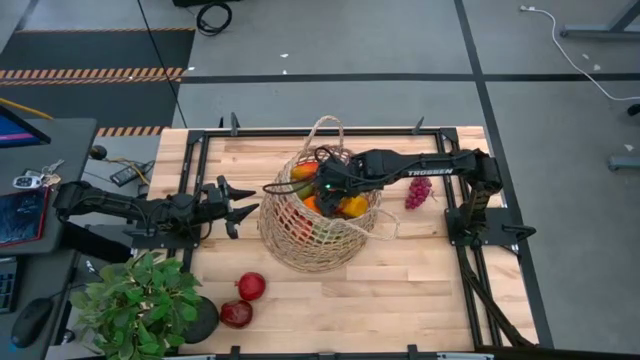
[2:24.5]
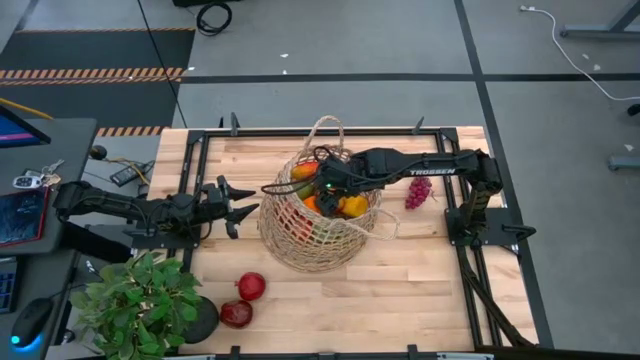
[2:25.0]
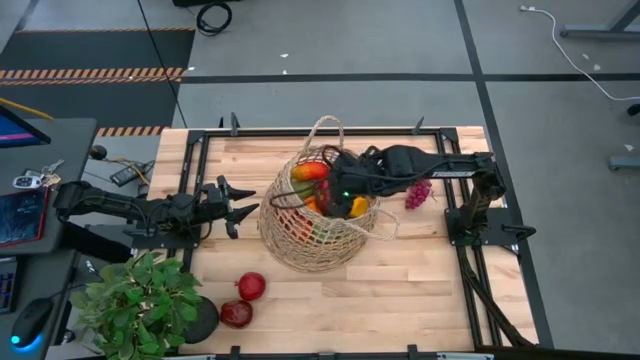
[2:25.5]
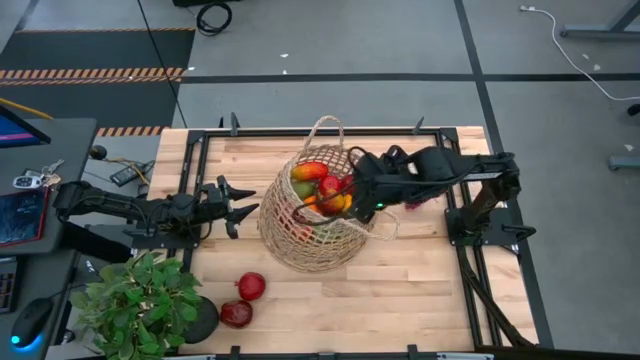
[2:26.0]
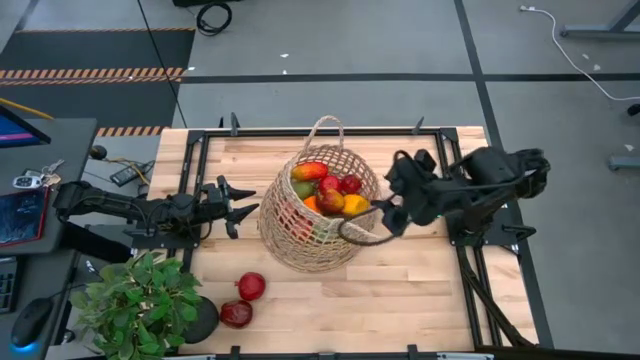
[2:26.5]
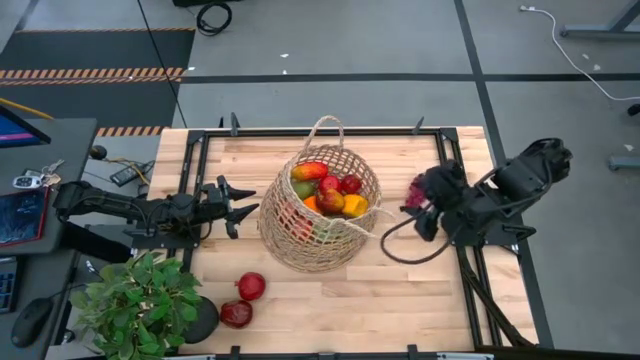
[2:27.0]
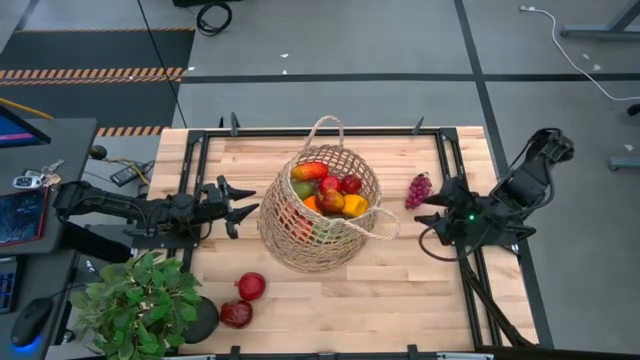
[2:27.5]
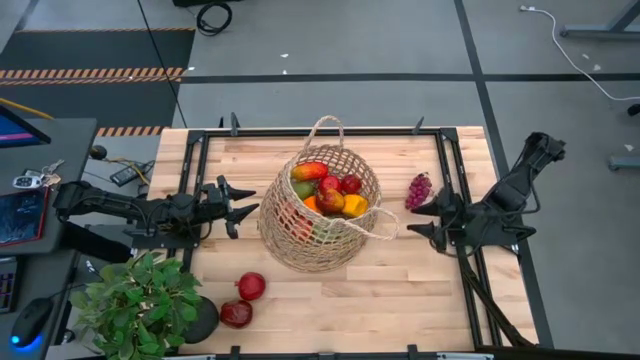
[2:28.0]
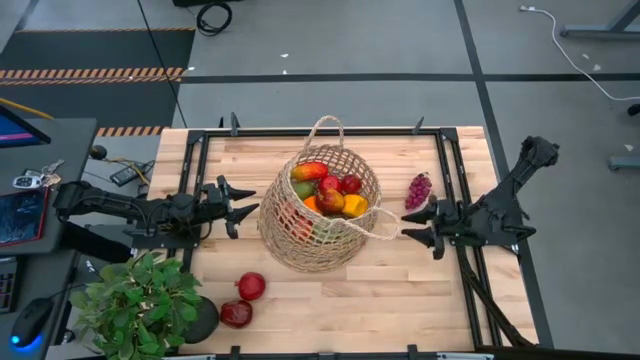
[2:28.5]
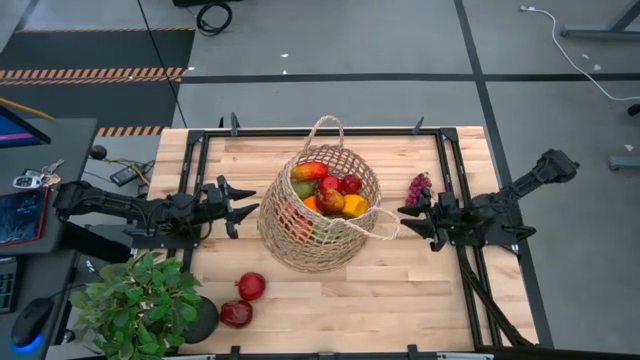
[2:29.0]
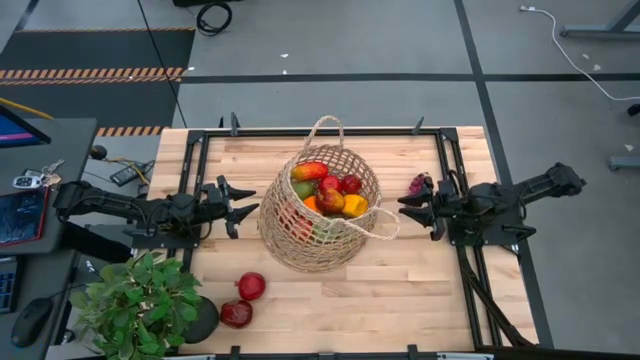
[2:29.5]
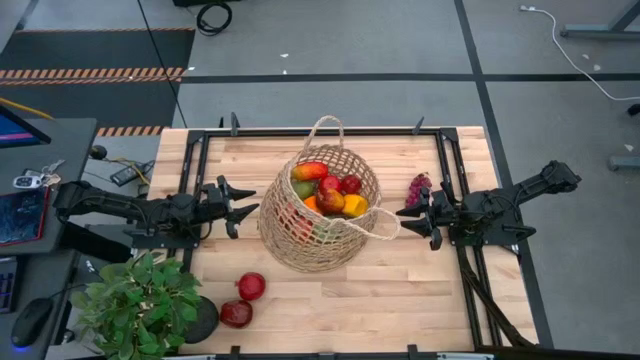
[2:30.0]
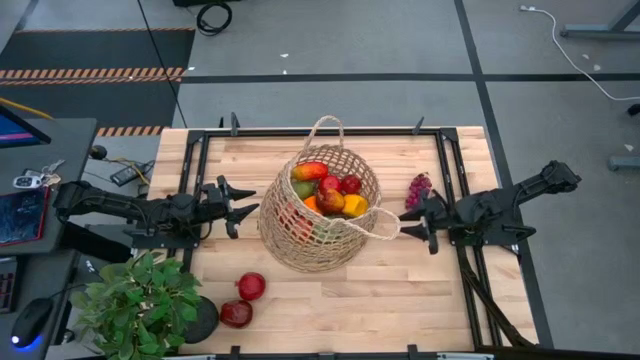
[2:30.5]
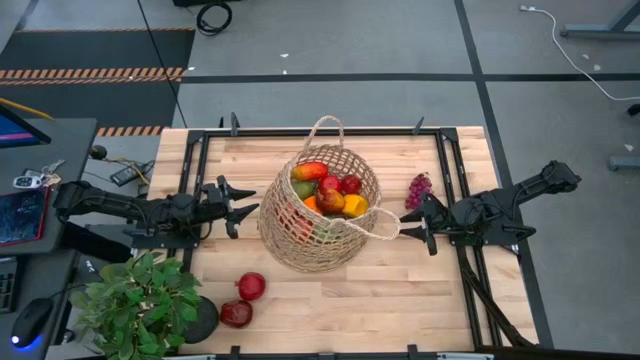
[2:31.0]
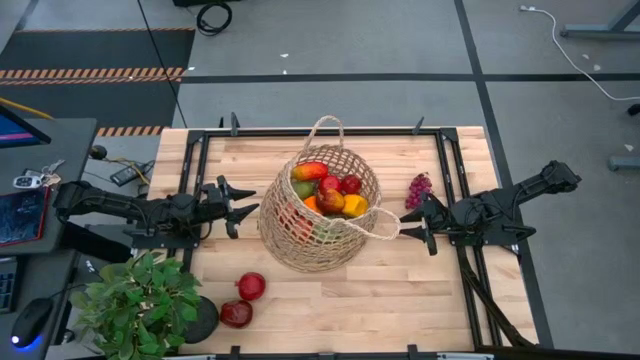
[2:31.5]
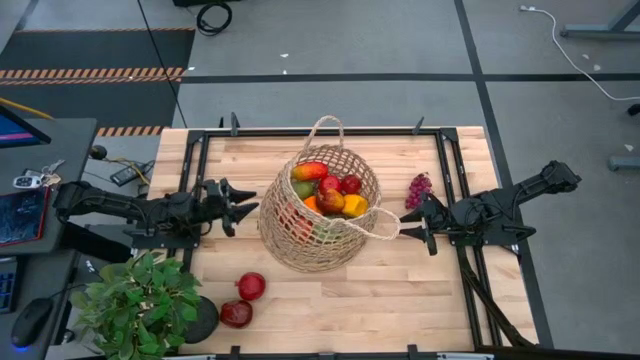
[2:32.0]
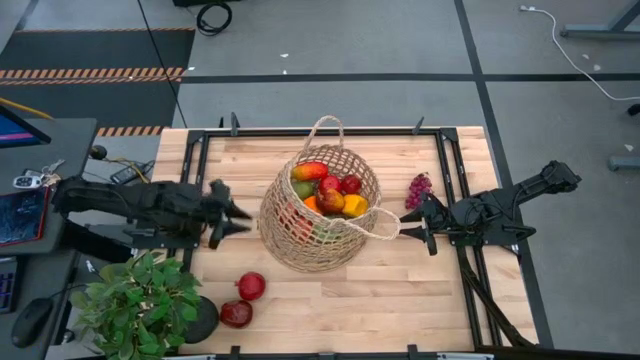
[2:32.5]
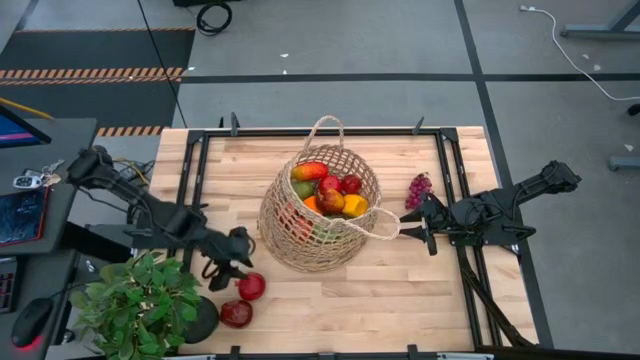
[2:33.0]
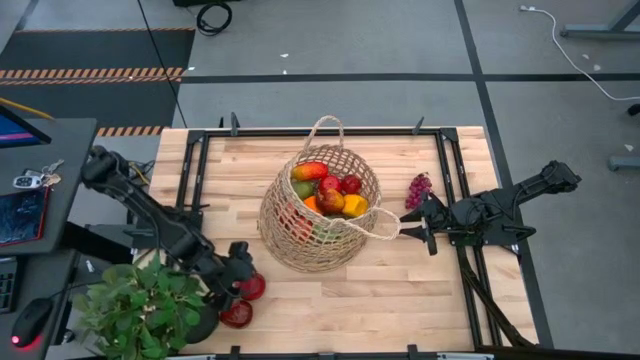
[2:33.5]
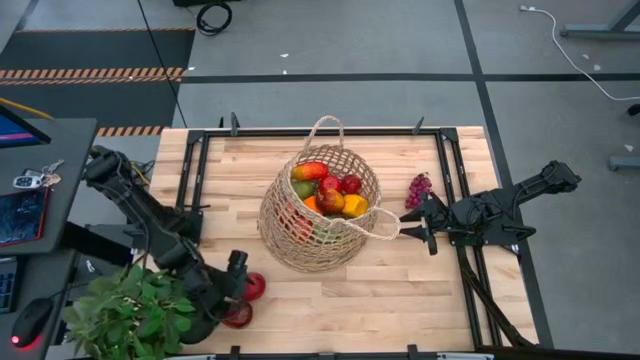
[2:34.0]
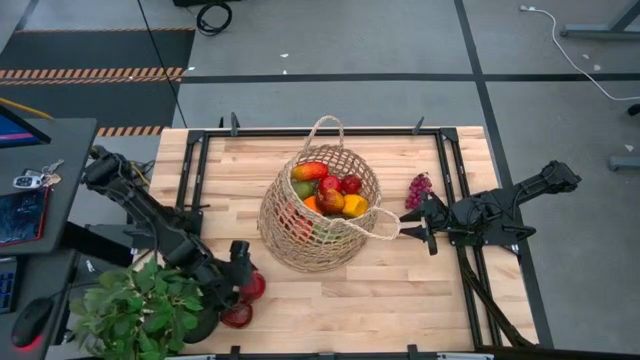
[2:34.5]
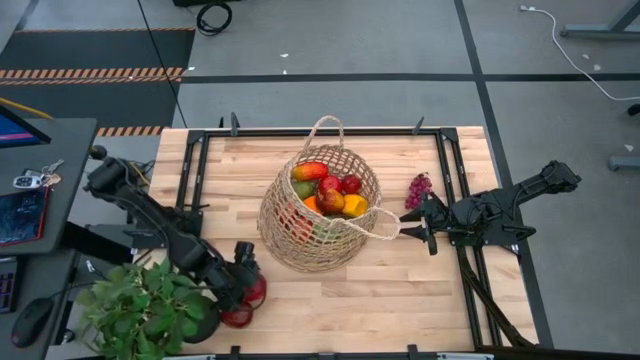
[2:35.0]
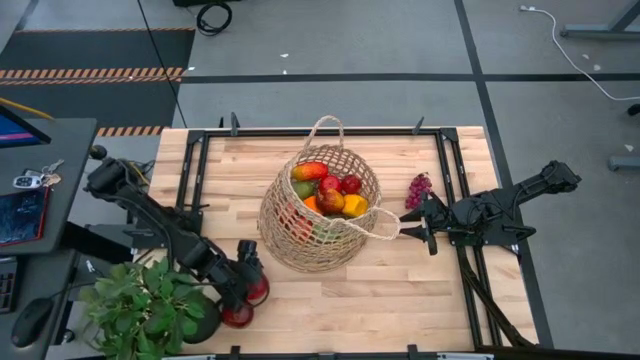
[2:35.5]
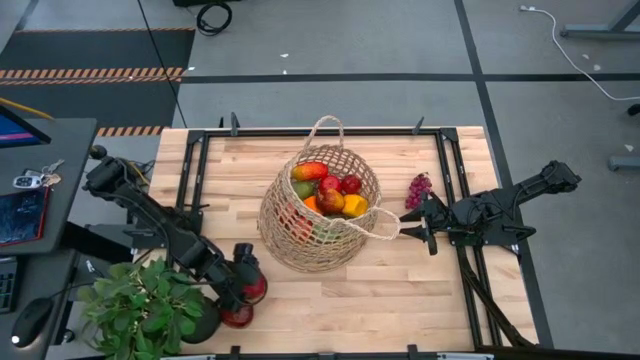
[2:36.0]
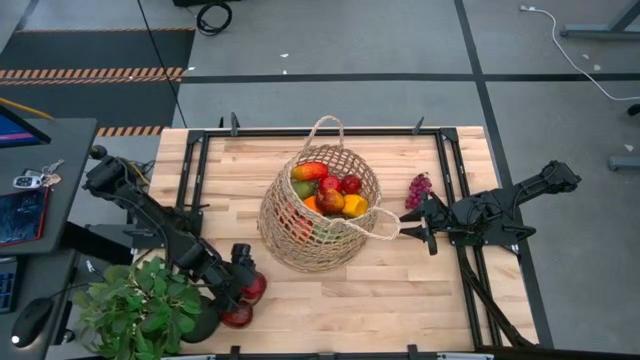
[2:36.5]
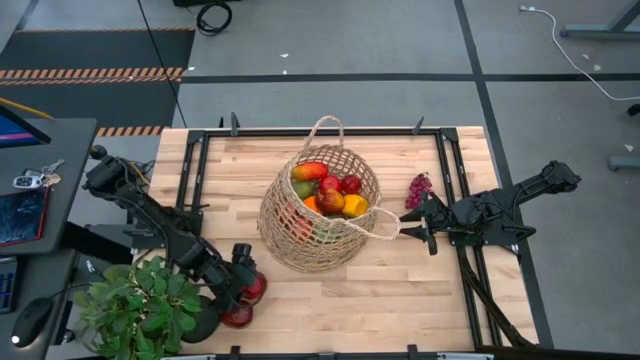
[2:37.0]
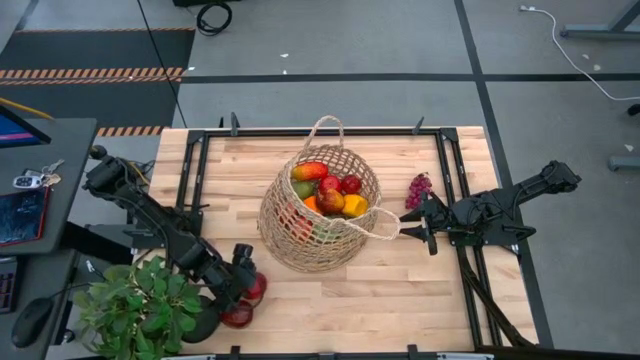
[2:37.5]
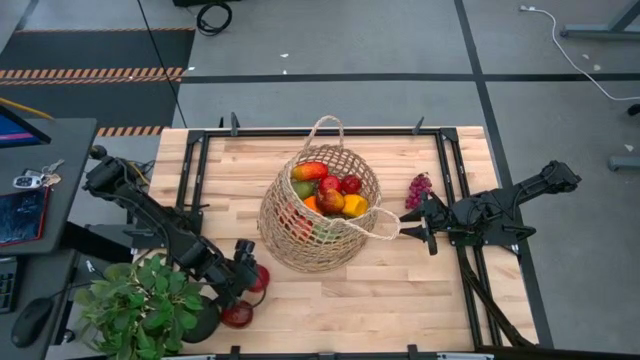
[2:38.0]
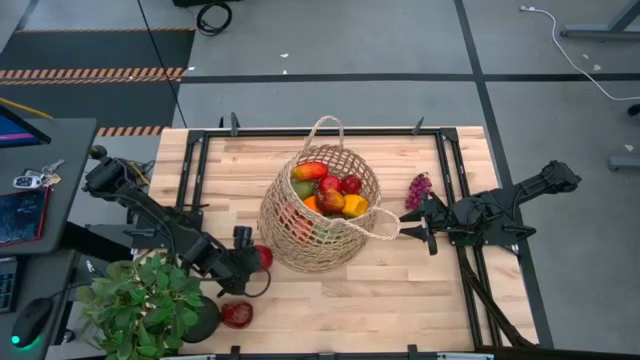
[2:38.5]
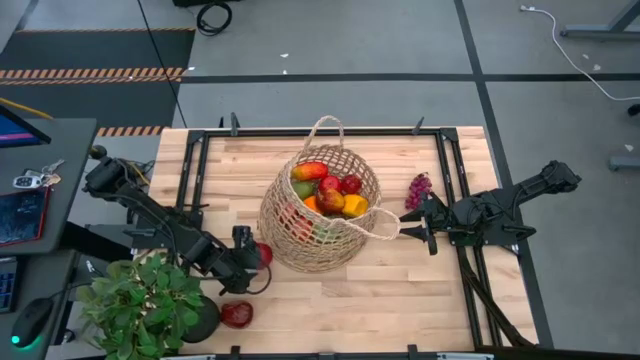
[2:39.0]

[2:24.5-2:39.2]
Task: Build produce basket
Put the pomegranate into the basket

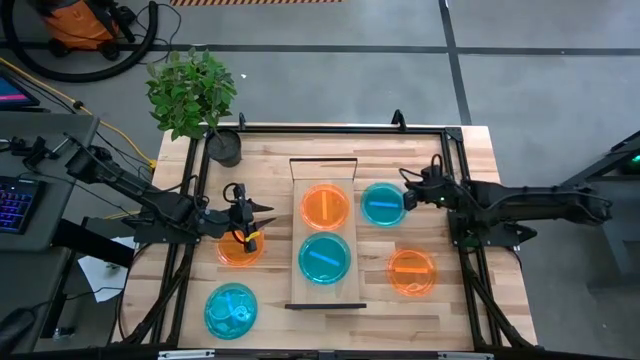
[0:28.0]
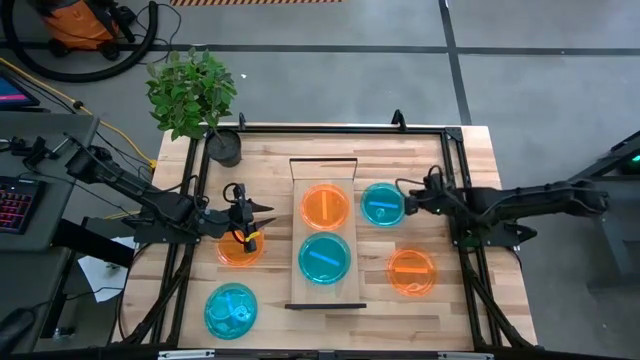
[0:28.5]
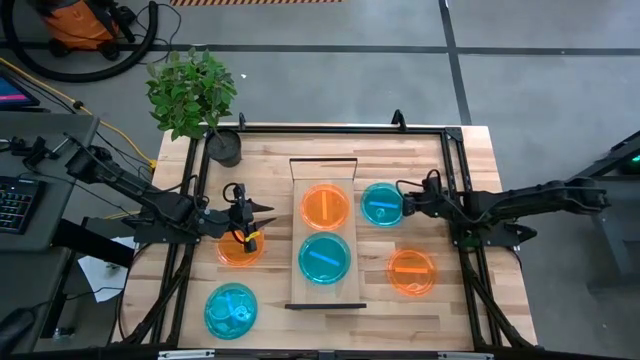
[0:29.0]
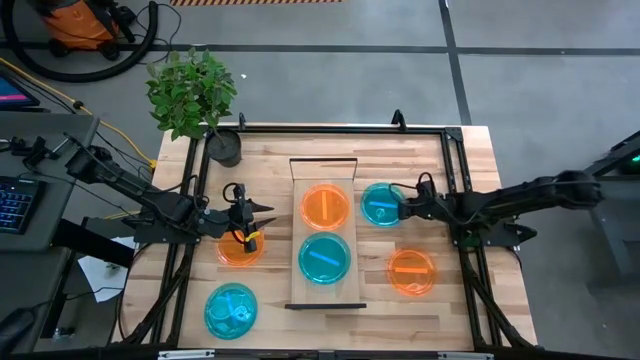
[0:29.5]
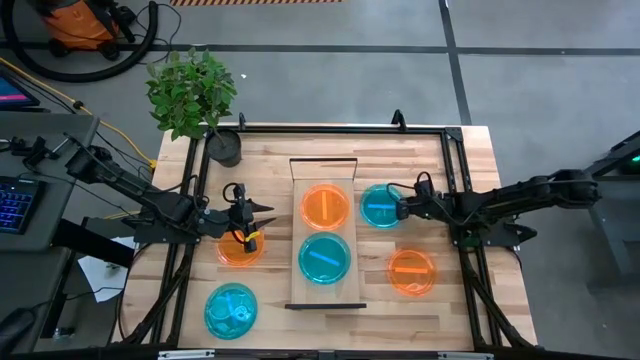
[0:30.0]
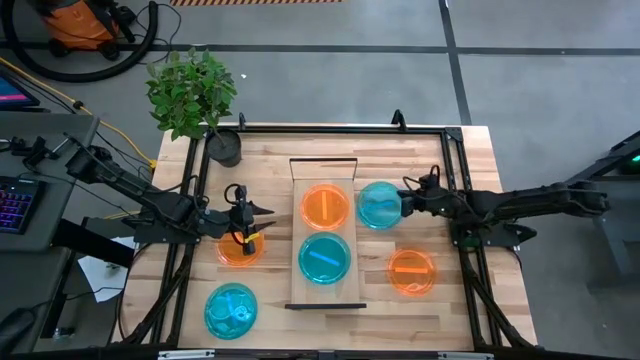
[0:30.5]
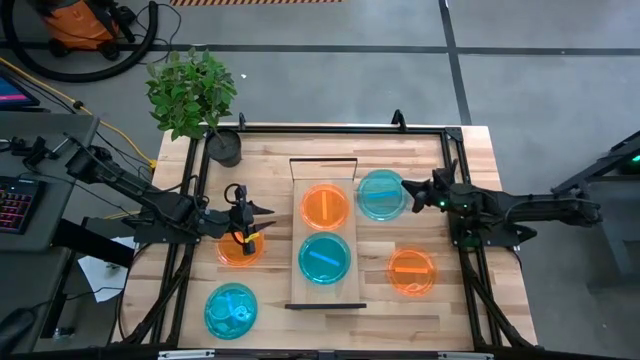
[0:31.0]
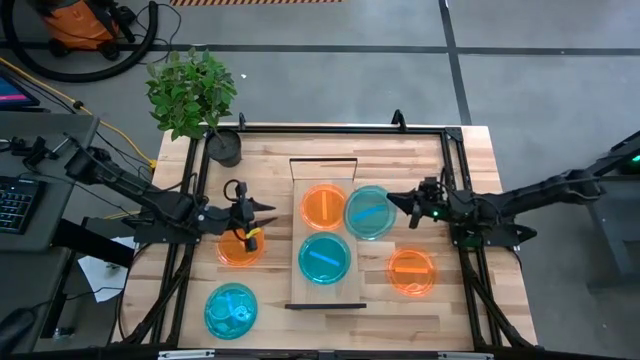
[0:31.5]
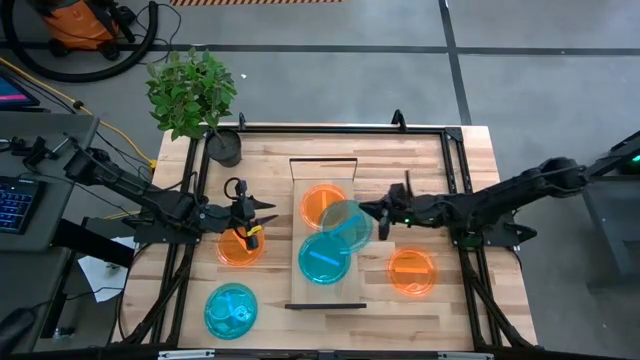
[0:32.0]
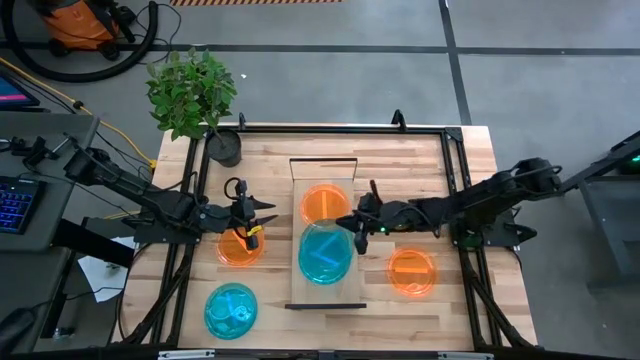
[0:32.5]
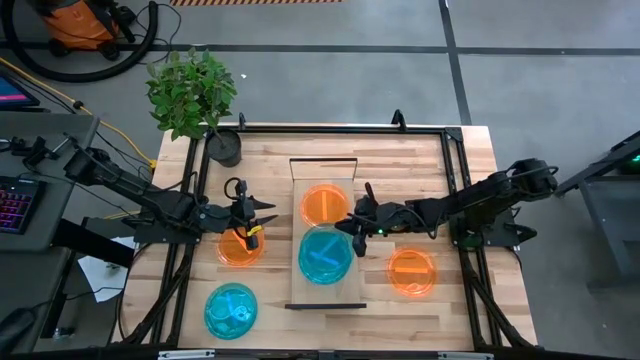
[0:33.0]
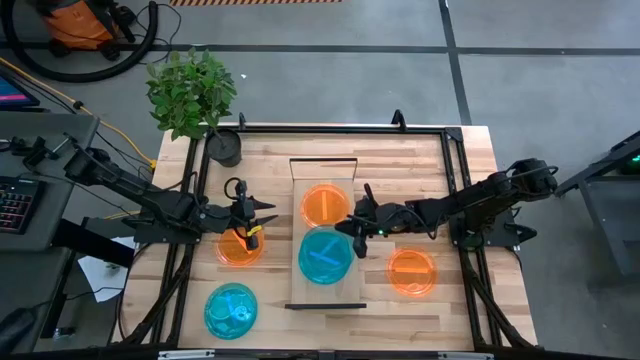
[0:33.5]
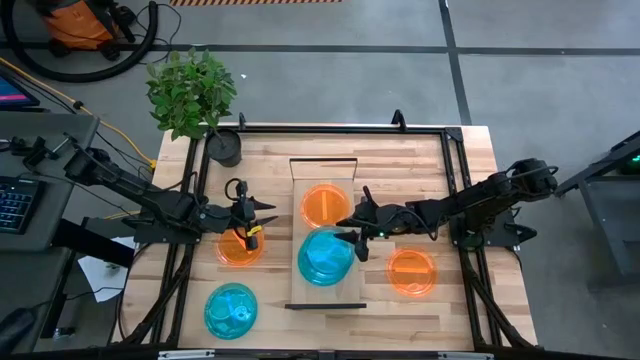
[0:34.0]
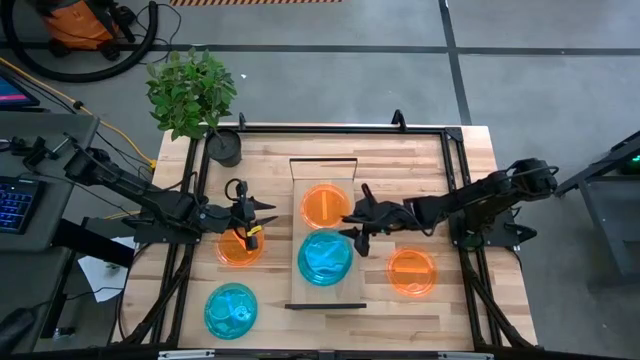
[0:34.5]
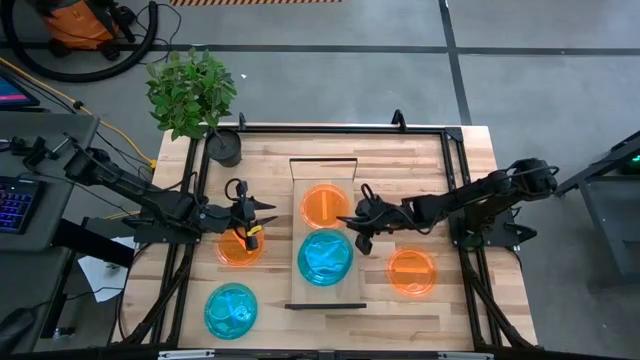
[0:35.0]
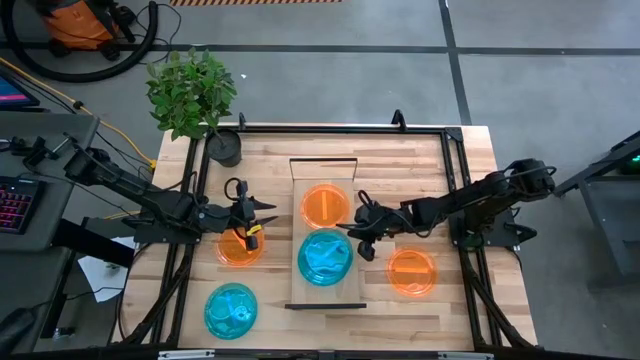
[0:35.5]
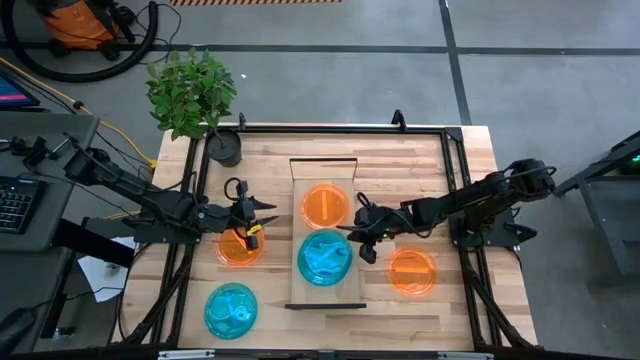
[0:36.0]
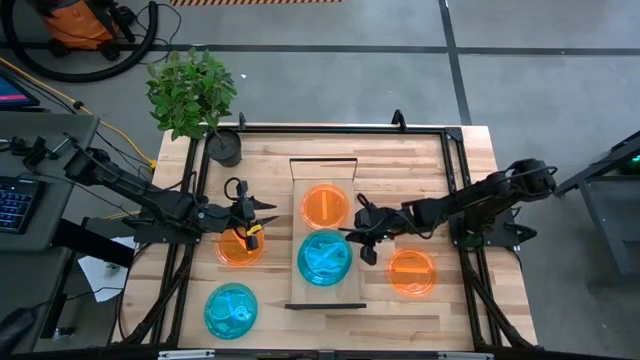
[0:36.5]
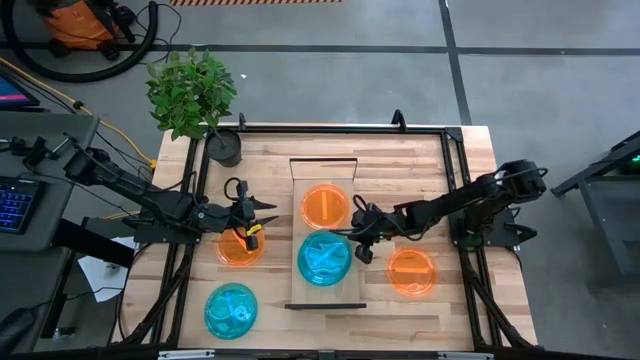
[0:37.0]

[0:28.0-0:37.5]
Task: Place and stack plates onto a shelf
Stack the right blue plate on top of the other blue plate on the shelf
